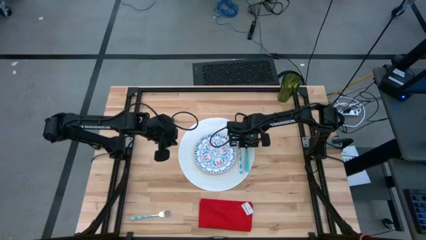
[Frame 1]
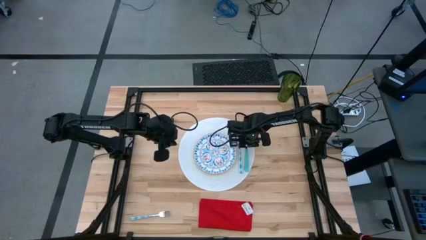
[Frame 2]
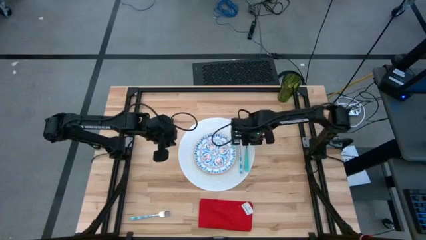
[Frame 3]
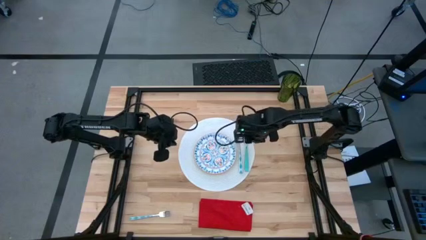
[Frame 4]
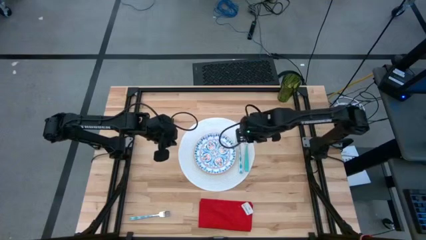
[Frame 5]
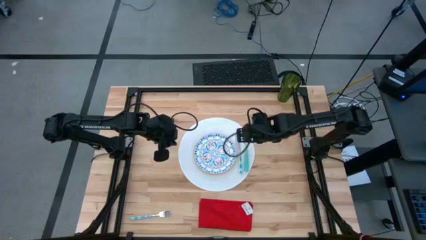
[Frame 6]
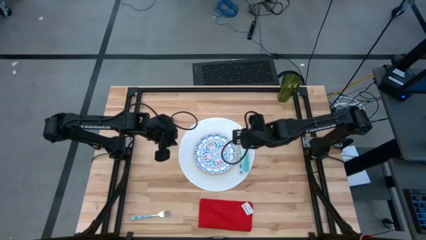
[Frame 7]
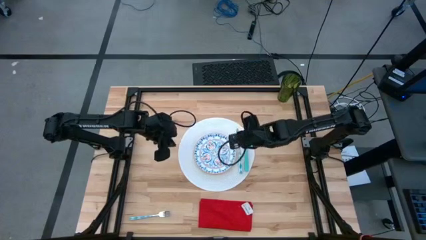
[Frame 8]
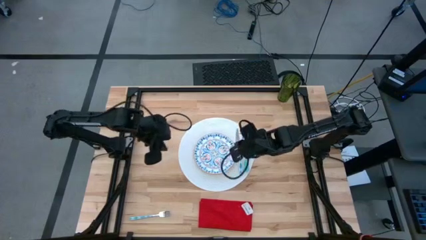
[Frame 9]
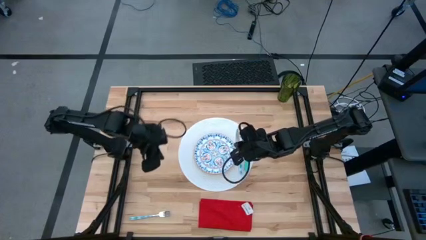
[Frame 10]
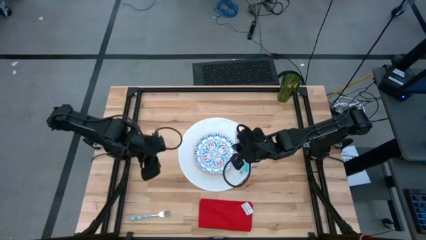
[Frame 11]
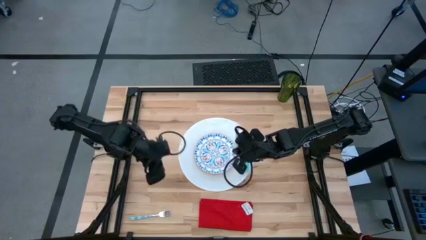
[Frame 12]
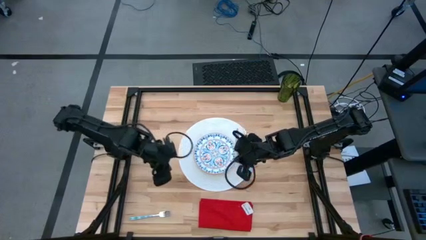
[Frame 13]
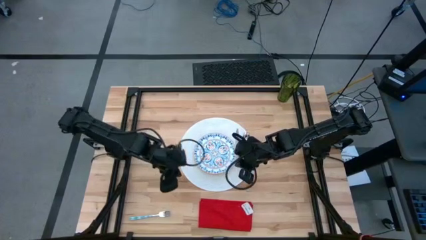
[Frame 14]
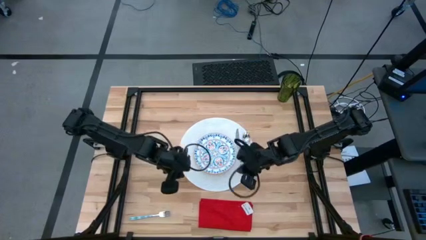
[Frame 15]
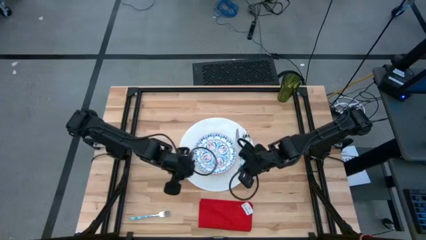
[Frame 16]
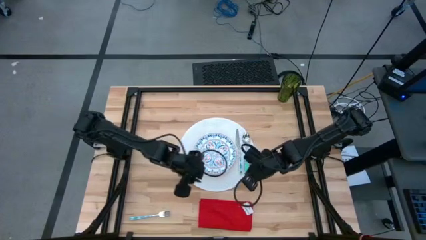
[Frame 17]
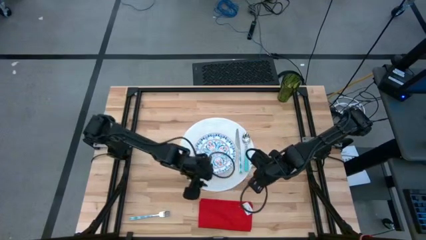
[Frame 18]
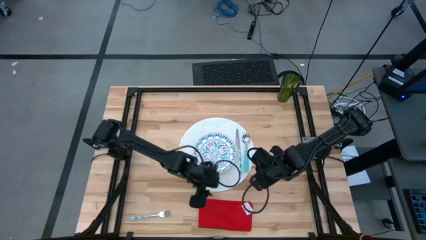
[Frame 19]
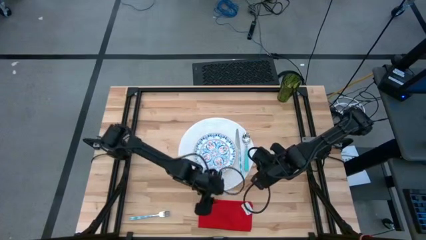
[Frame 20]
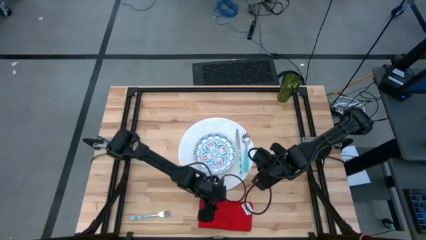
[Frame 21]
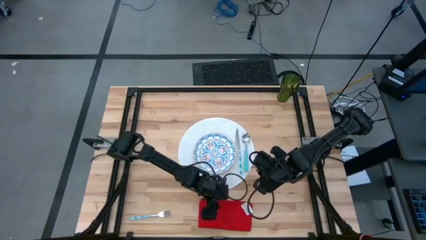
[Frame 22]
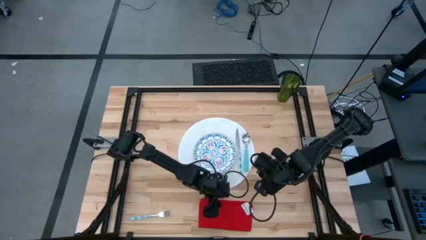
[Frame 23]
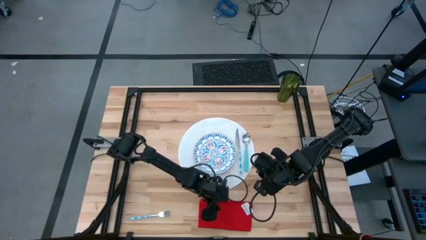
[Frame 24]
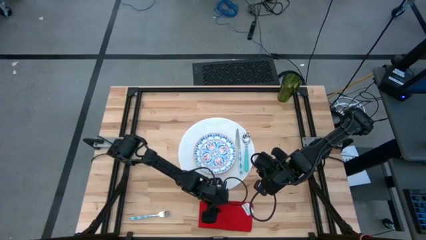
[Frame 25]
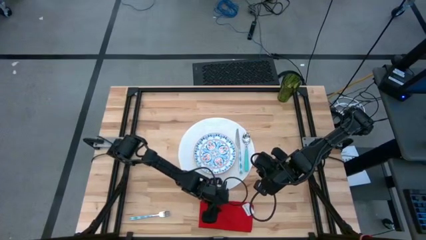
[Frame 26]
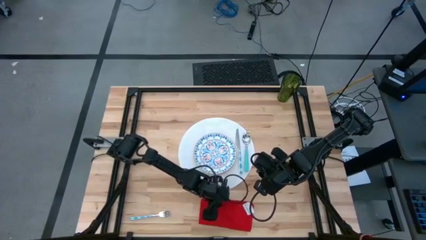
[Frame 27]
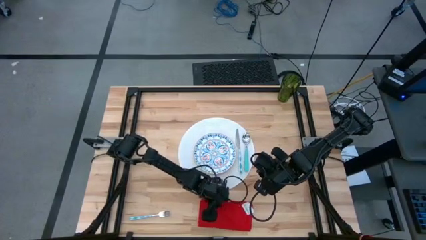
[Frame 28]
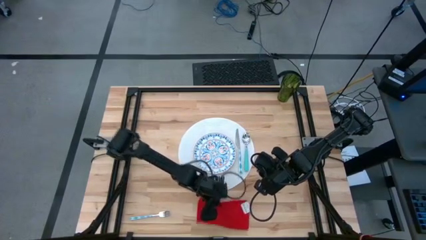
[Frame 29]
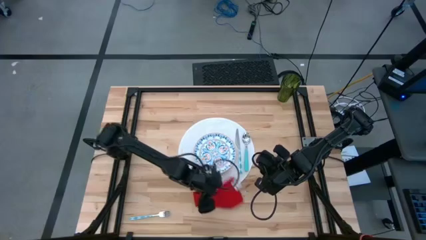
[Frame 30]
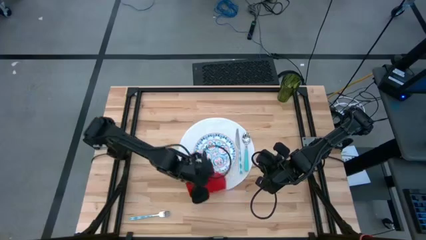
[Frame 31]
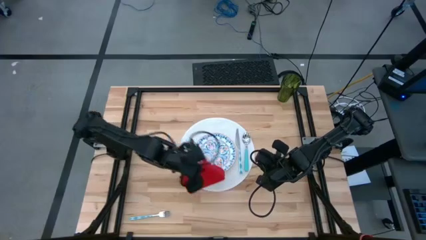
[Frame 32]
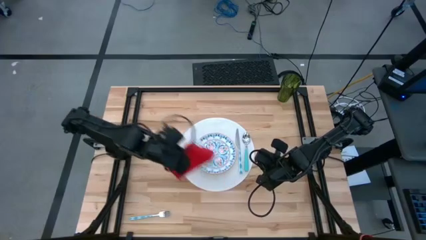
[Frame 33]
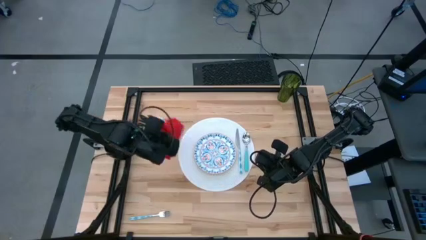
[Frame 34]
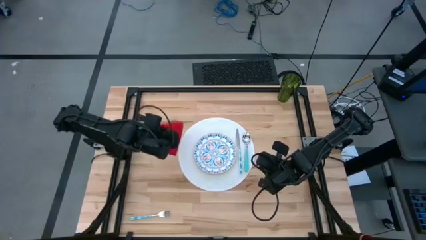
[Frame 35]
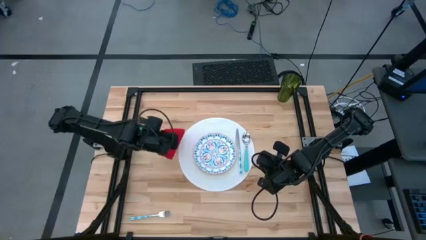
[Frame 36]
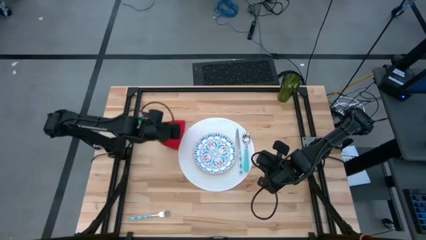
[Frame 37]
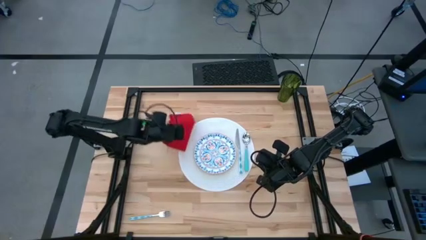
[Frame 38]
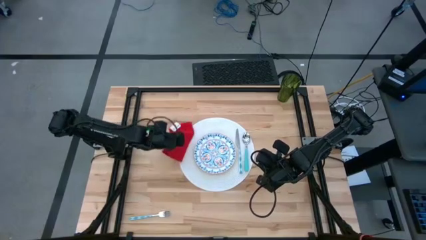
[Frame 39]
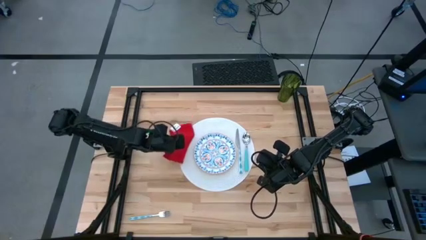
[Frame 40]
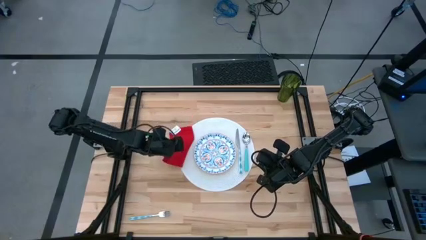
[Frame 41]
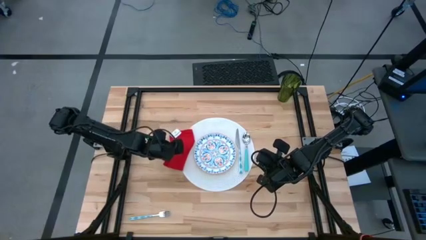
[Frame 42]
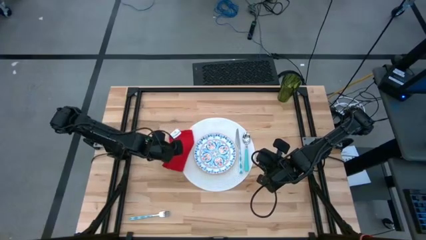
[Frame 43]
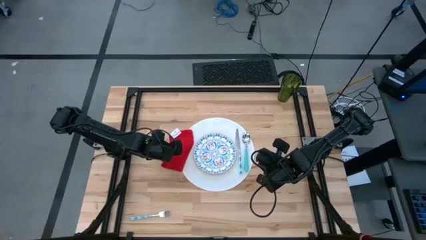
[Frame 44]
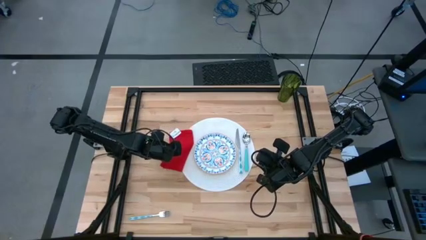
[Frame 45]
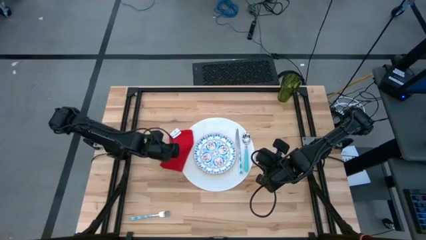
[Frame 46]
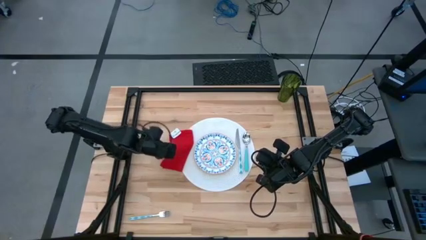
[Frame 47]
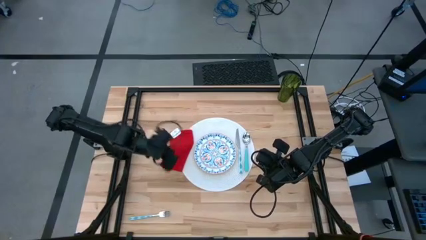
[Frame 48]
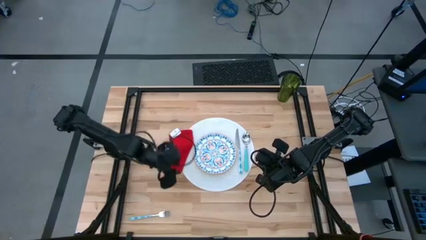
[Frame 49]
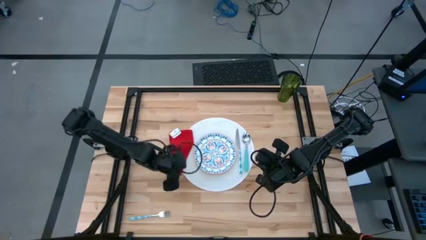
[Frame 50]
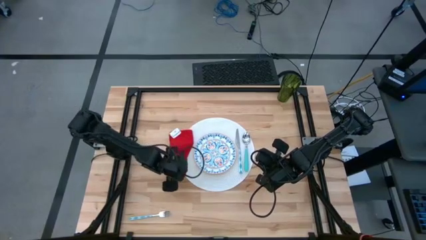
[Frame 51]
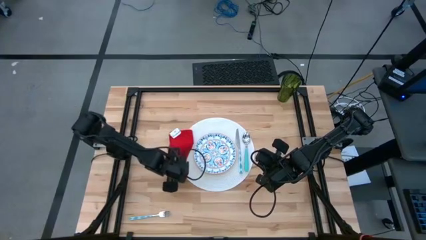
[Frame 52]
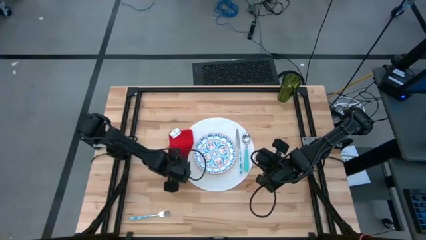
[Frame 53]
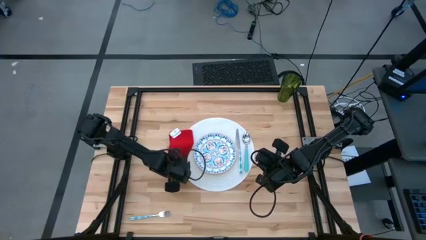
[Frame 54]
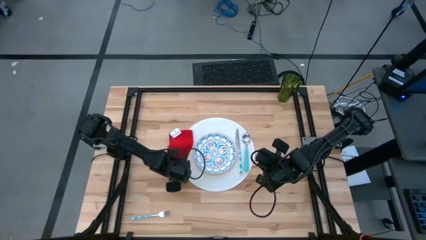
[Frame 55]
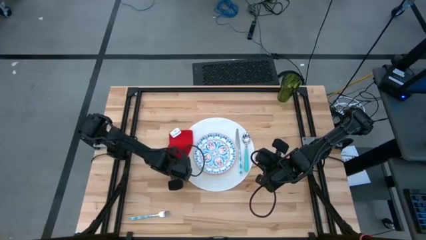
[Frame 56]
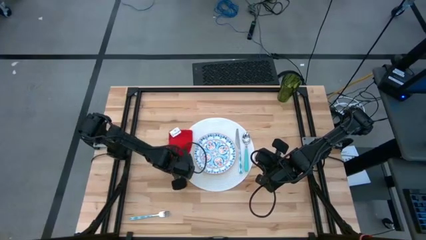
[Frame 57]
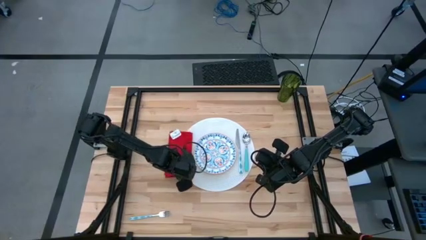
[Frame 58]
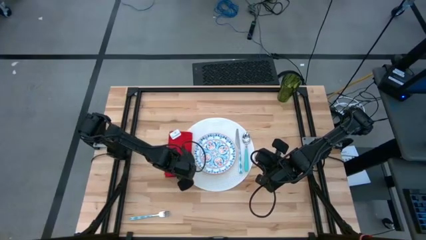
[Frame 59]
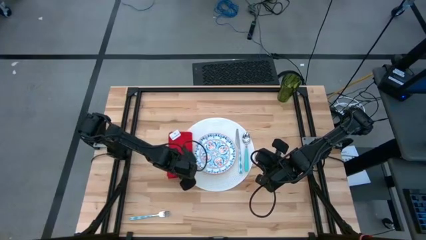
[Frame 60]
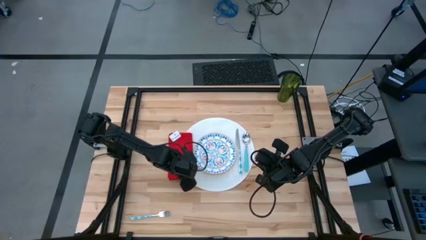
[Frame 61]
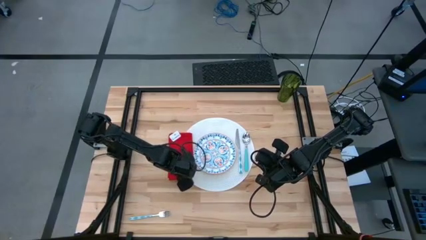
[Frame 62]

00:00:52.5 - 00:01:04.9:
Task: Set table place
Put the red table napkin on the white placemat to the left side of the blue and orange plate

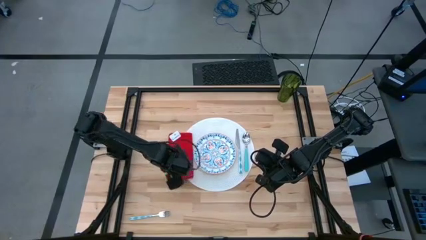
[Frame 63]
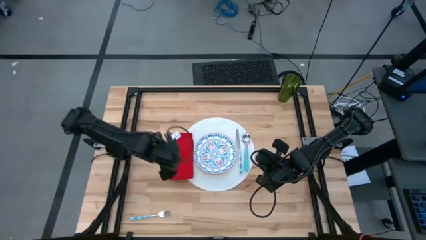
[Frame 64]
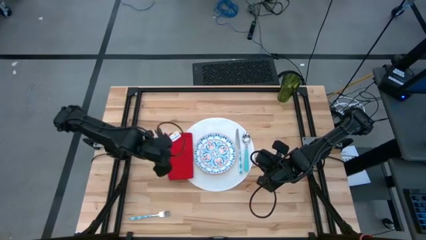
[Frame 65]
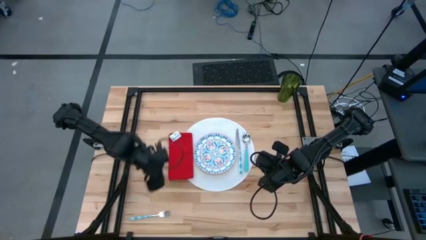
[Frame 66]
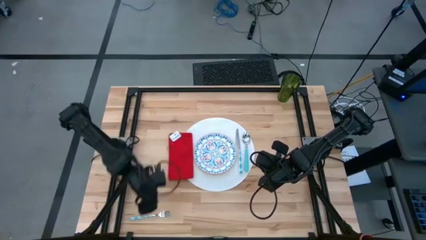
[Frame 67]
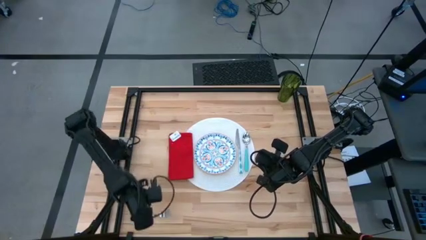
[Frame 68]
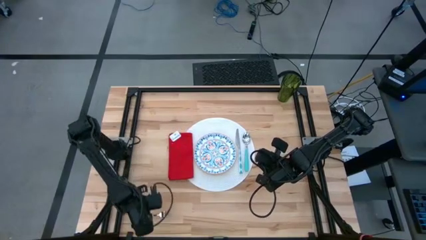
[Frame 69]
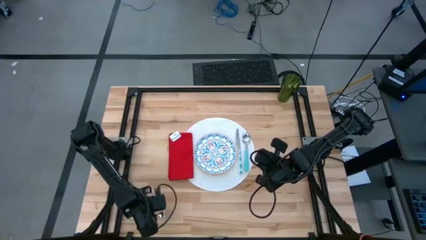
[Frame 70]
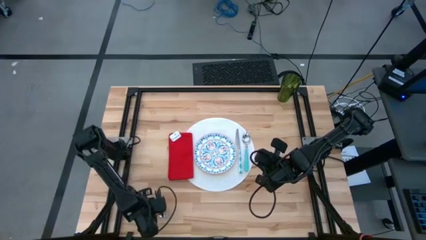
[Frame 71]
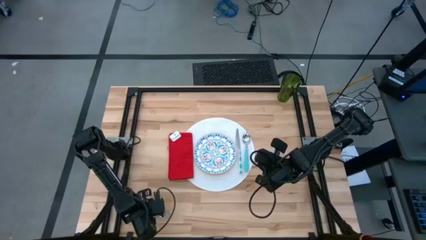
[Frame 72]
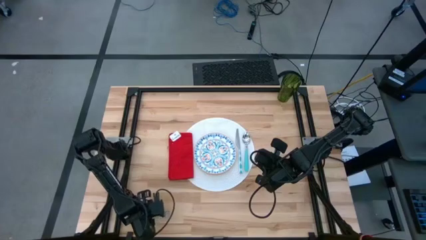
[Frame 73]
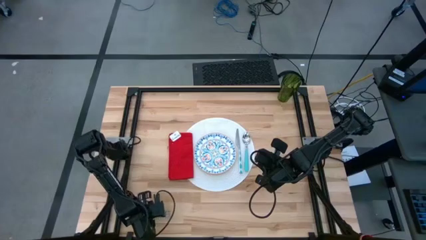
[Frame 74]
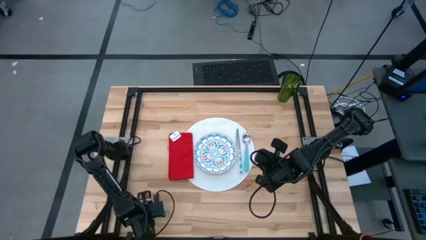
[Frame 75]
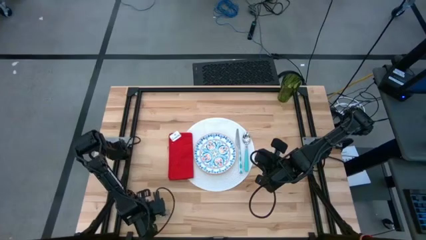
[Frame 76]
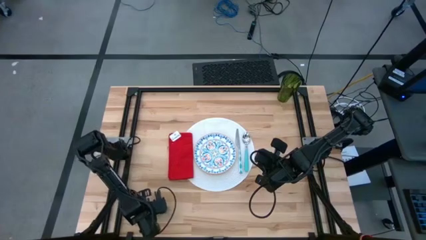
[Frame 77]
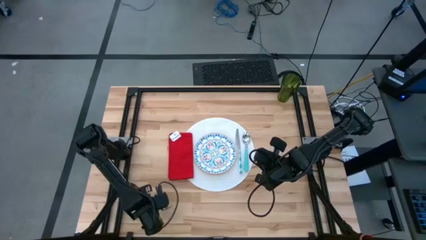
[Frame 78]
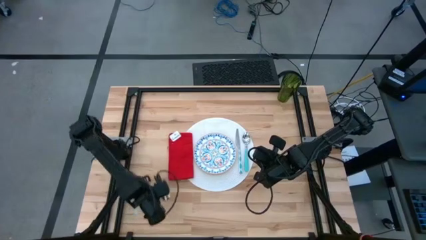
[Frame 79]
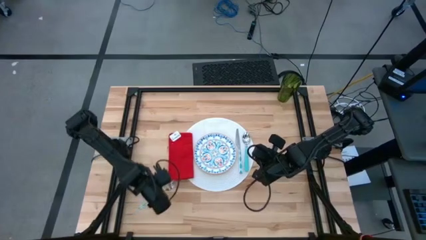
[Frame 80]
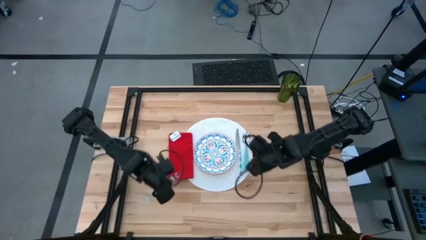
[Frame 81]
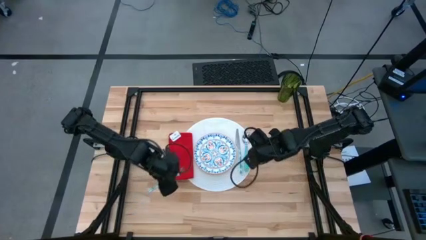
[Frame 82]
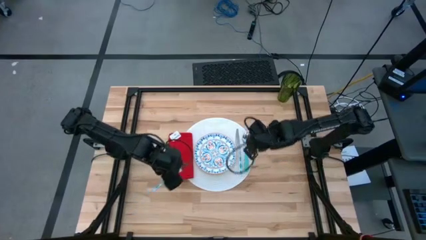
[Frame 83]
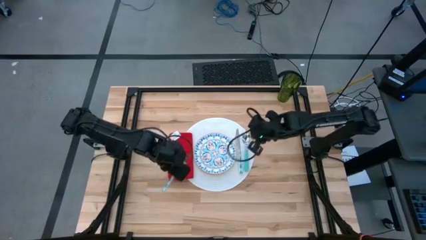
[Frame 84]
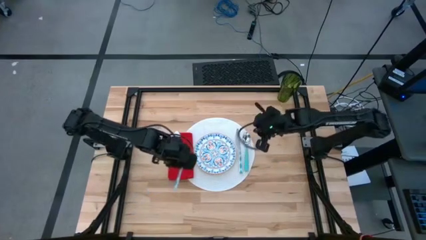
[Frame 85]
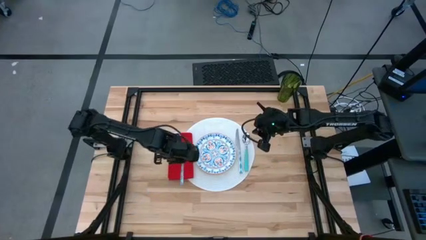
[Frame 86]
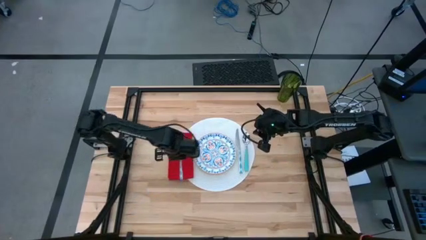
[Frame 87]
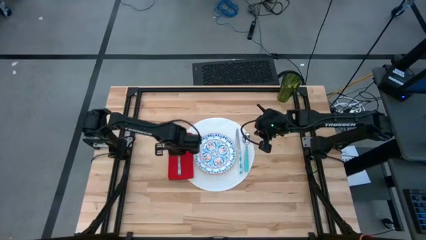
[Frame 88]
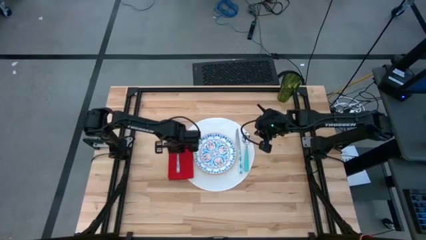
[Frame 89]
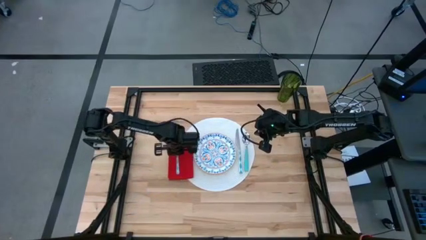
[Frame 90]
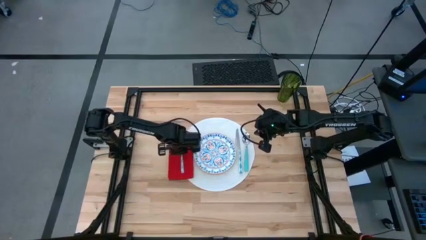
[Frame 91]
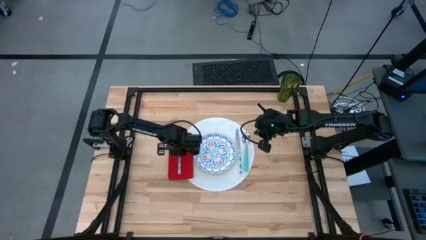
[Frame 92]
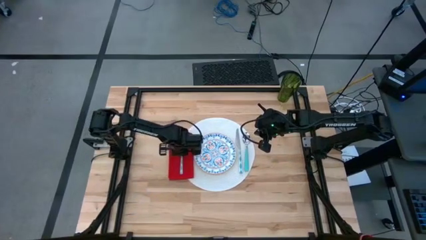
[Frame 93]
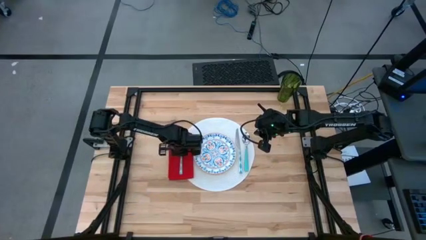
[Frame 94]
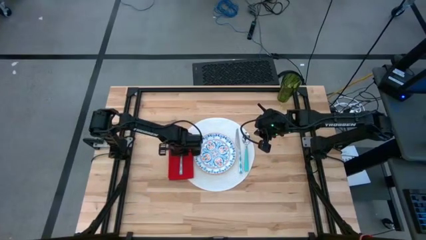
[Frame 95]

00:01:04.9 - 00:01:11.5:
Put the blue fork on the red table napkin
